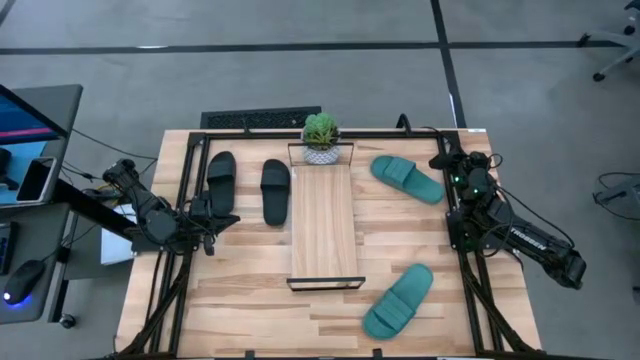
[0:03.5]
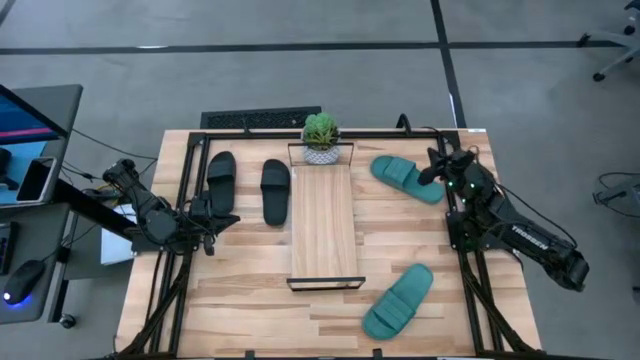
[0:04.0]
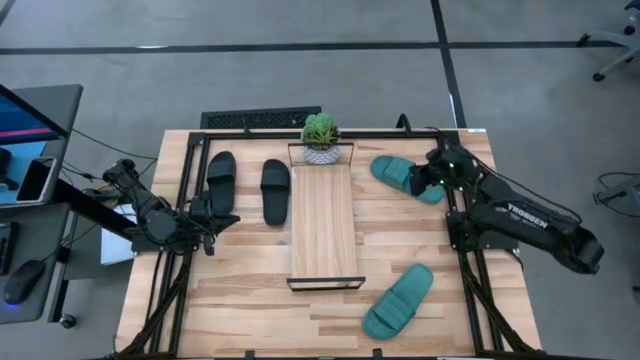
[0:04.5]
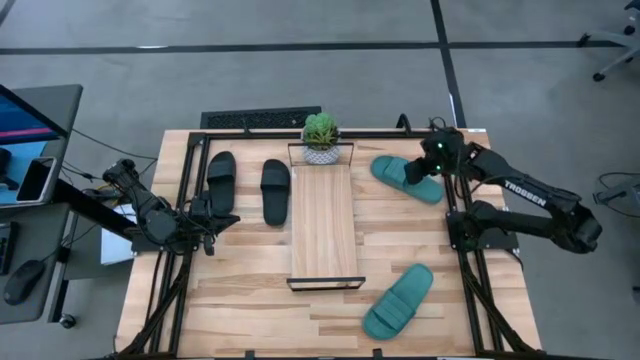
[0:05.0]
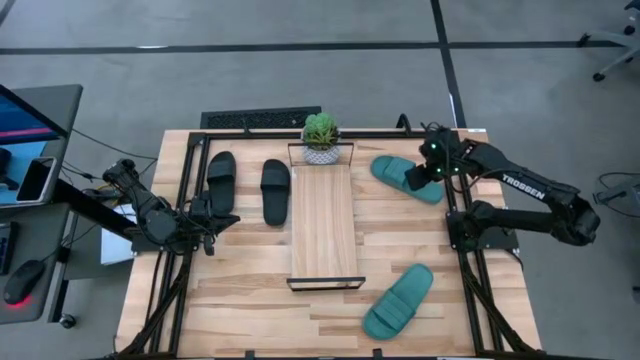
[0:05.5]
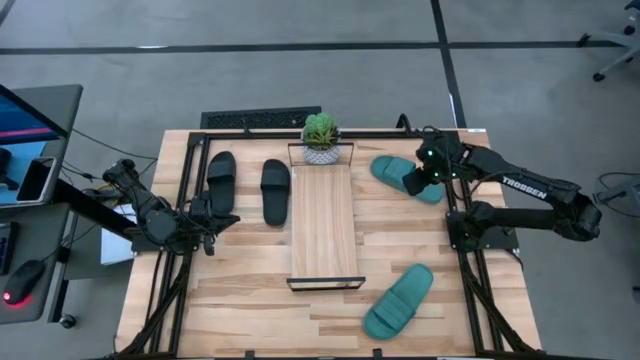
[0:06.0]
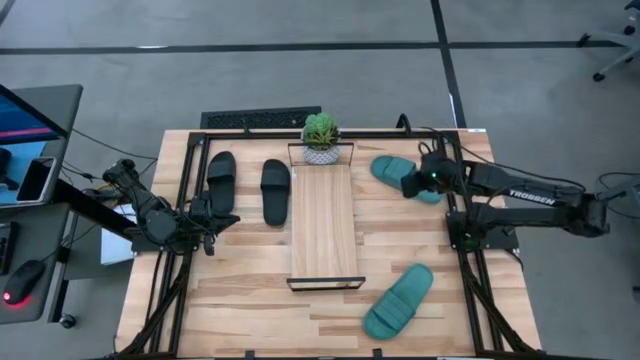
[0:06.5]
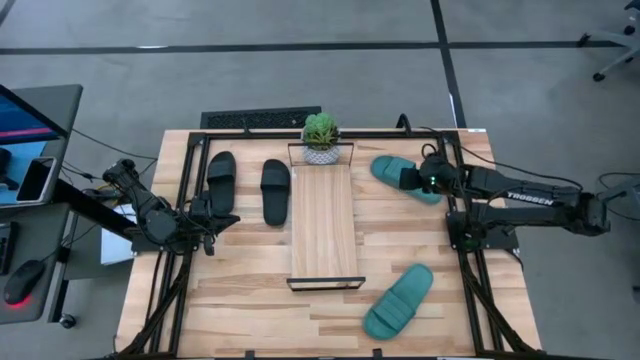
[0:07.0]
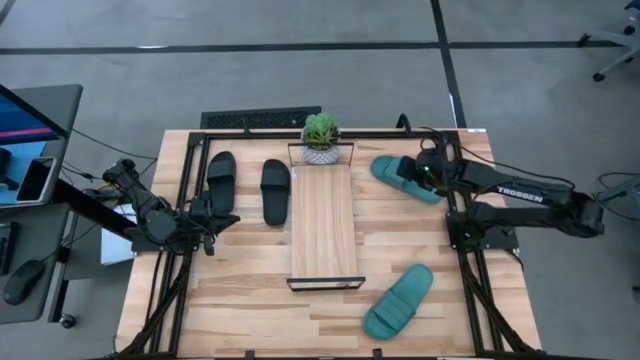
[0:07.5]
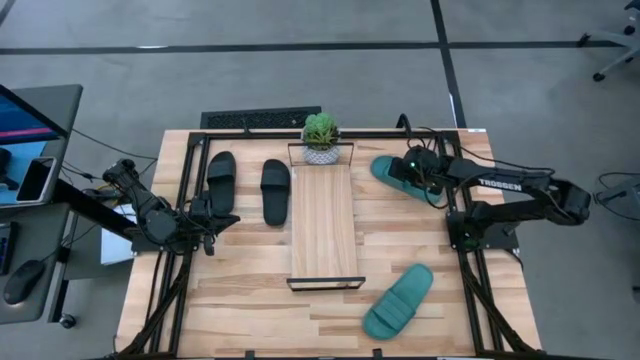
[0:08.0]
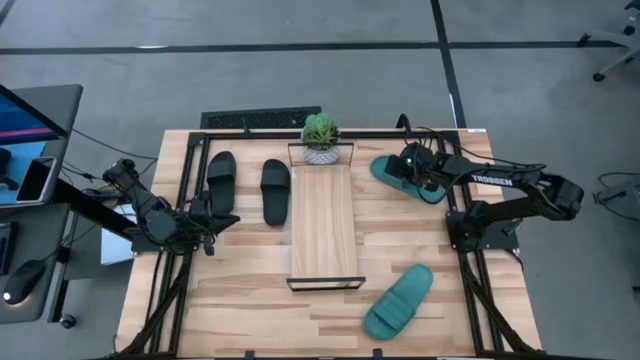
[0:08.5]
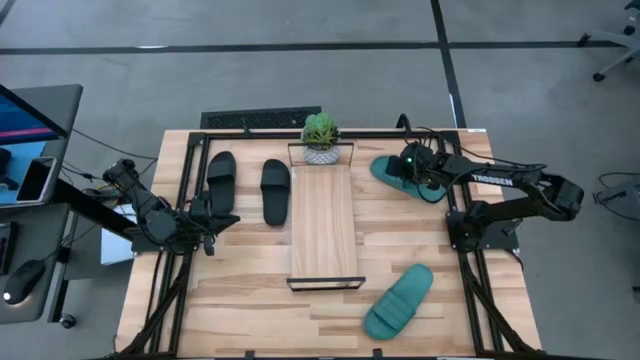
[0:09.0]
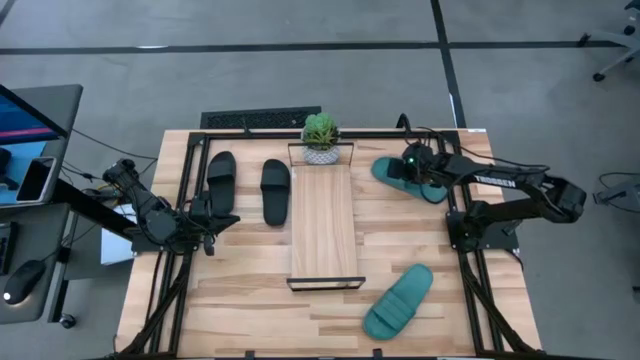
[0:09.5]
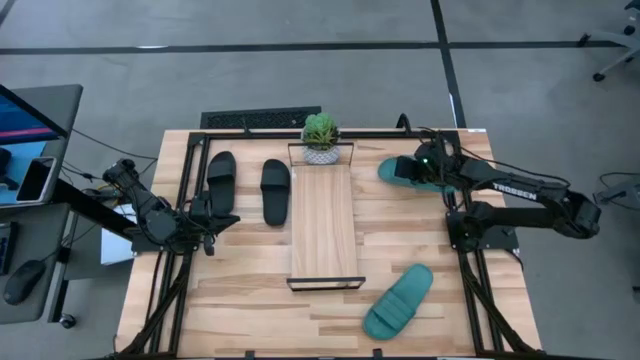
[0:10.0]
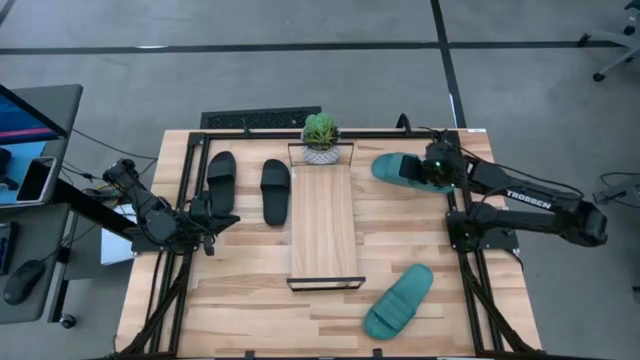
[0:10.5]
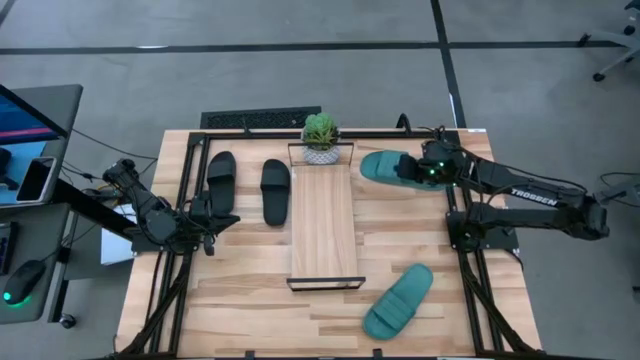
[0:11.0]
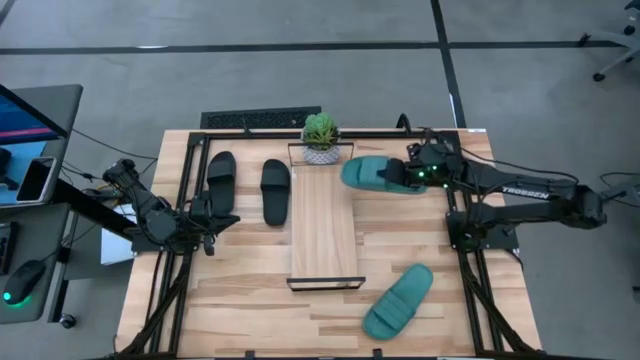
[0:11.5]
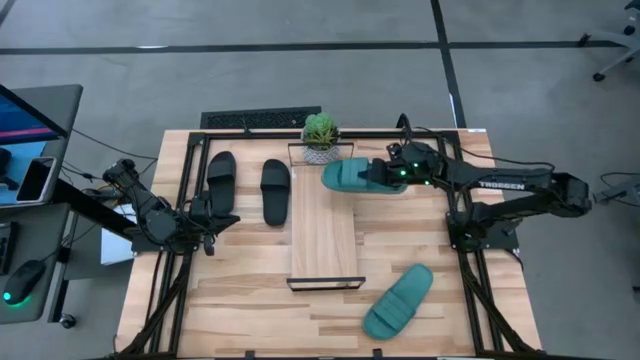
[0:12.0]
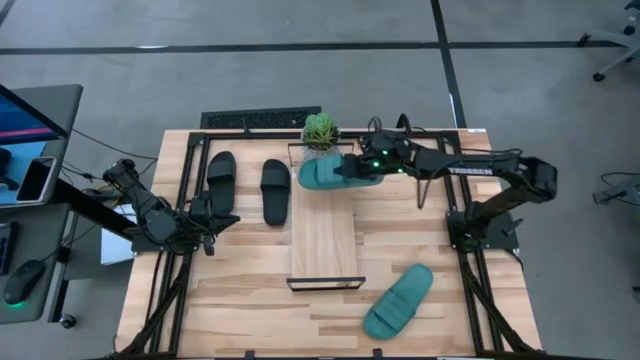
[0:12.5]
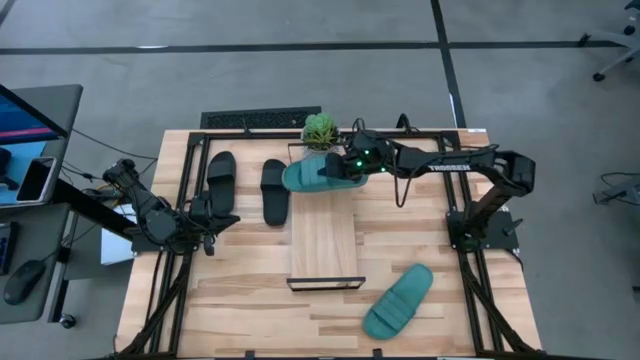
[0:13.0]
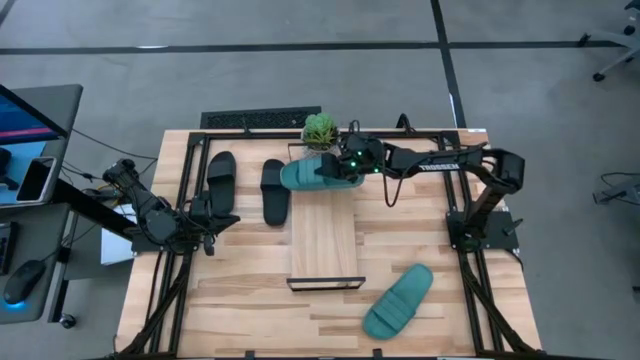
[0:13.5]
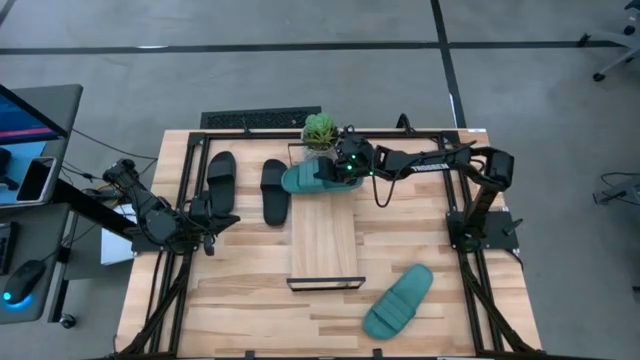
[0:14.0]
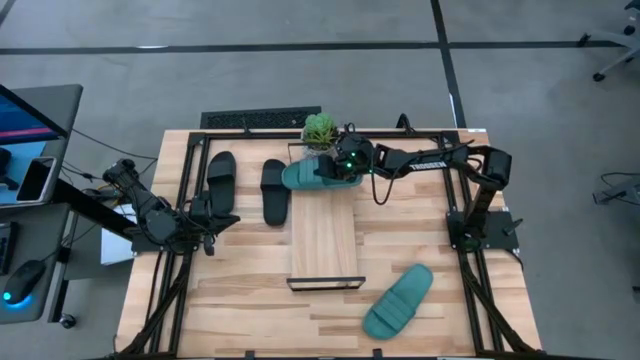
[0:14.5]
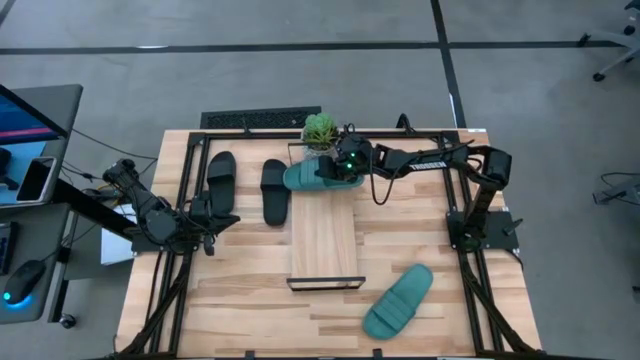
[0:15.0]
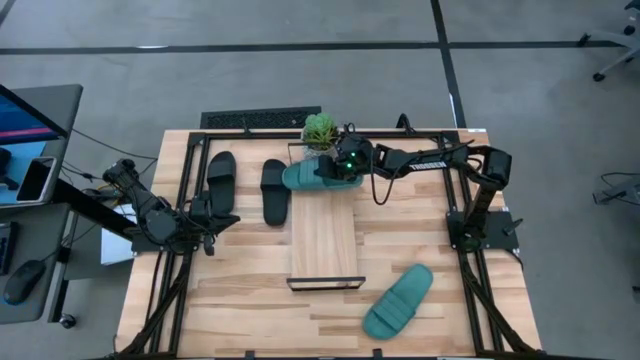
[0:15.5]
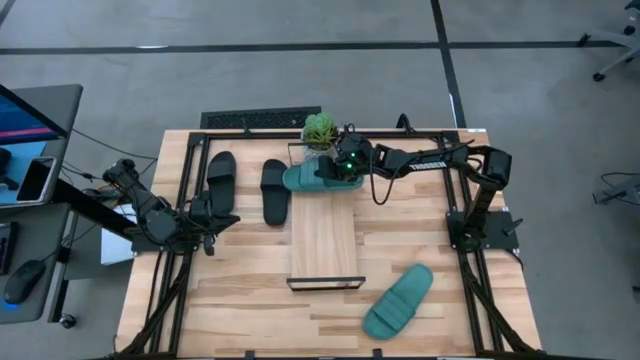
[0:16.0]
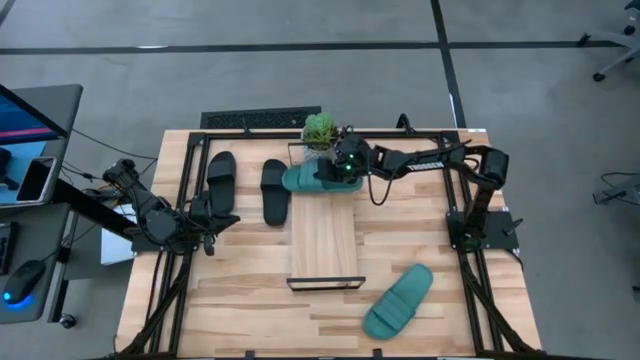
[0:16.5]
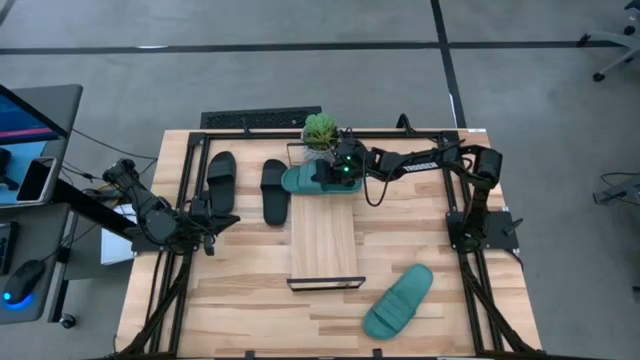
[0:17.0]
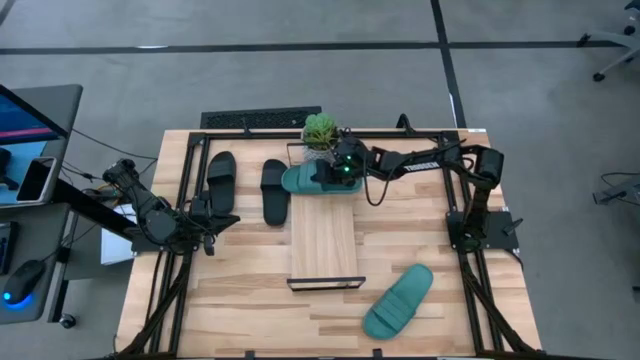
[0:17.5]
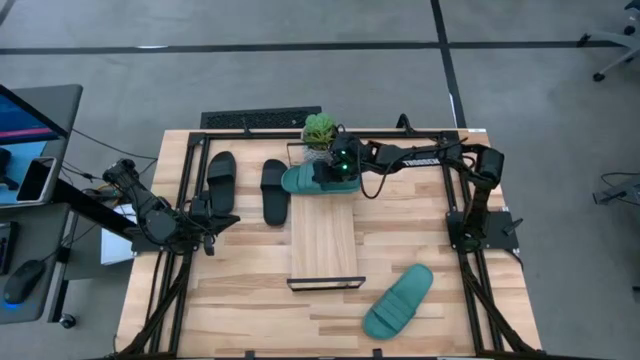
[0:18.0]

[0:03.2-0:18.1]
Task: Pick and place slides into the shelf
Put the top green slide on the shelf

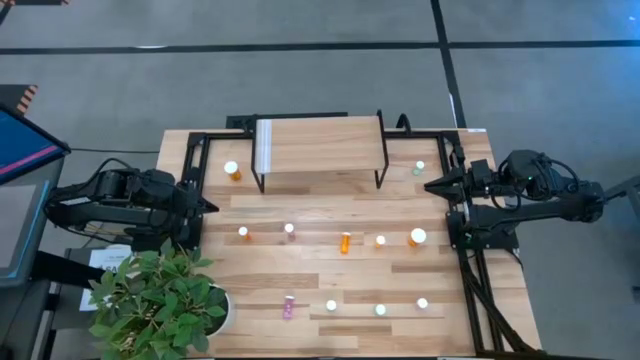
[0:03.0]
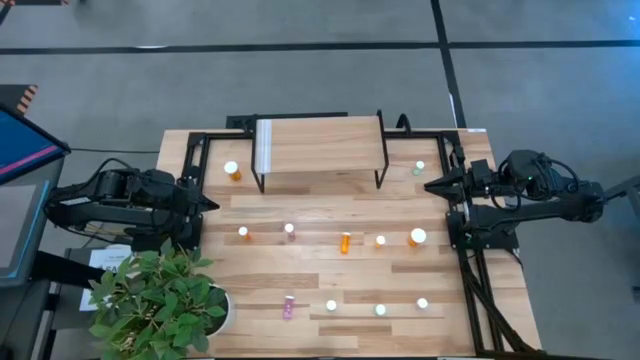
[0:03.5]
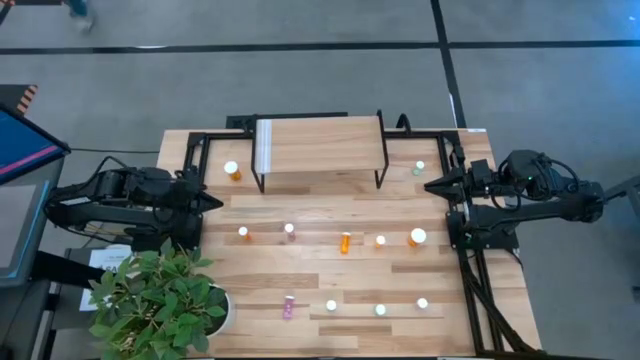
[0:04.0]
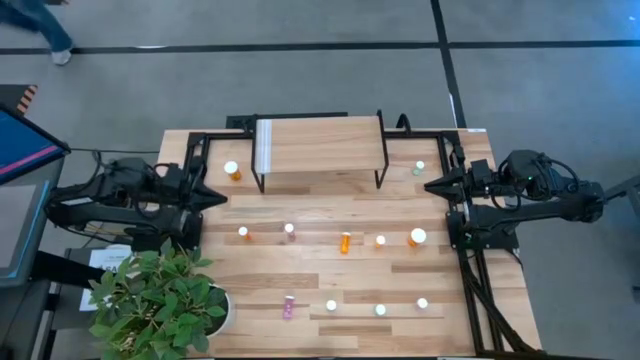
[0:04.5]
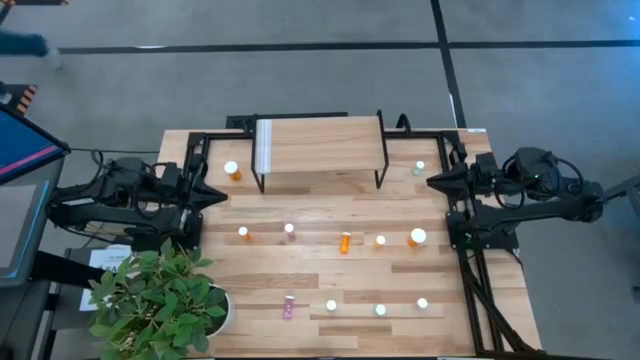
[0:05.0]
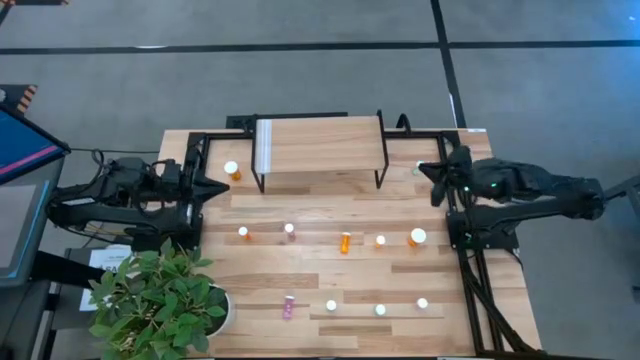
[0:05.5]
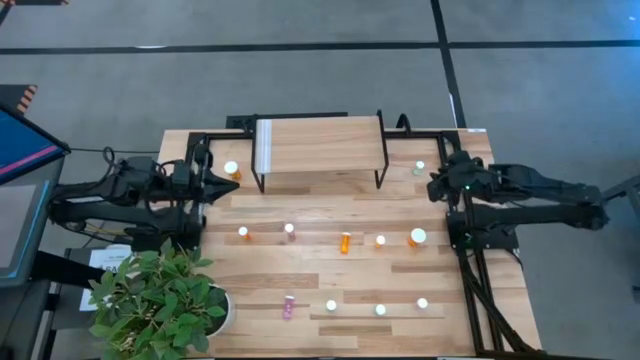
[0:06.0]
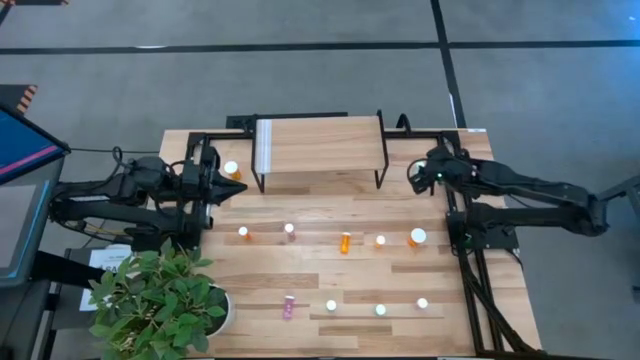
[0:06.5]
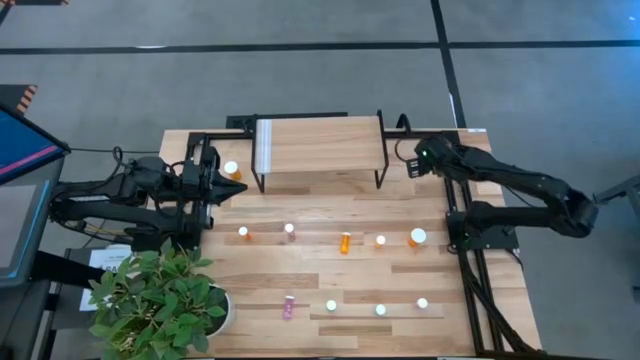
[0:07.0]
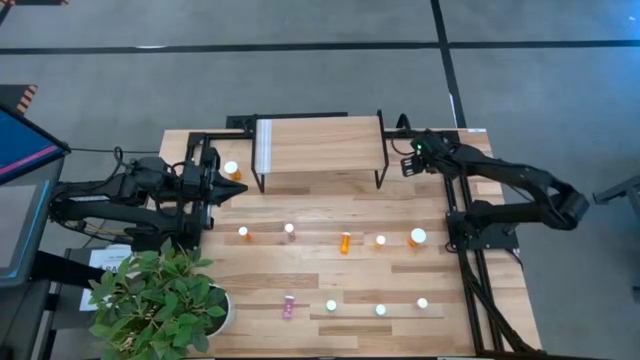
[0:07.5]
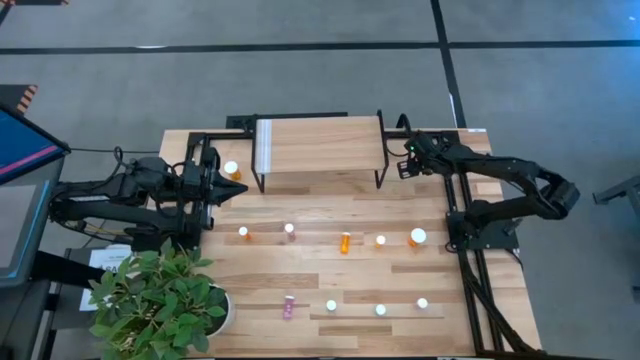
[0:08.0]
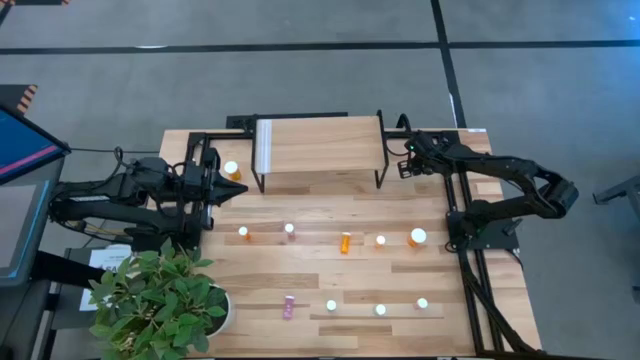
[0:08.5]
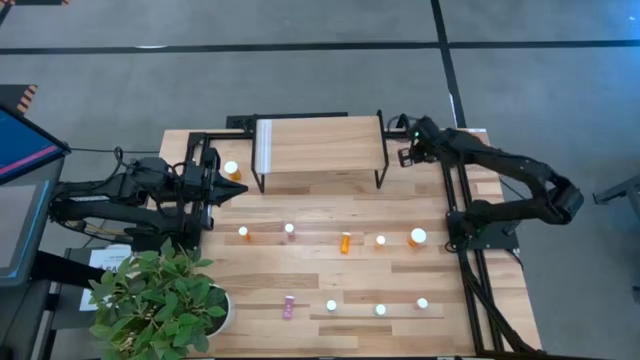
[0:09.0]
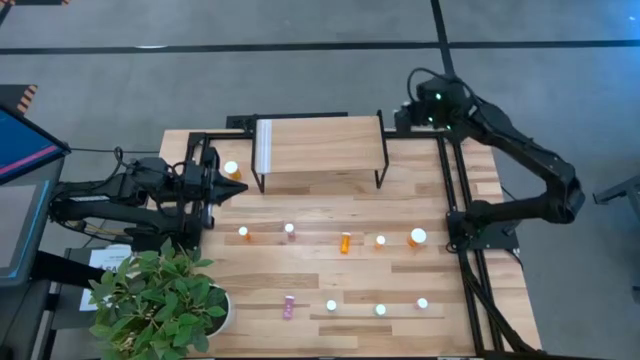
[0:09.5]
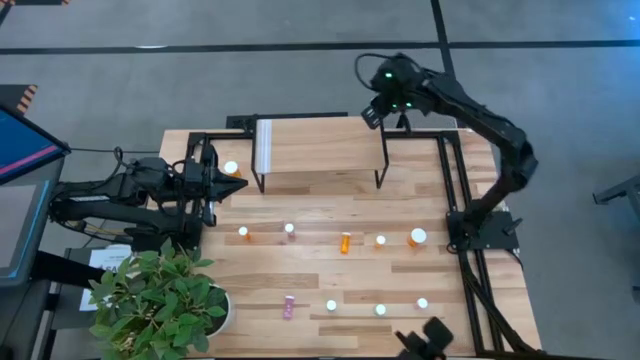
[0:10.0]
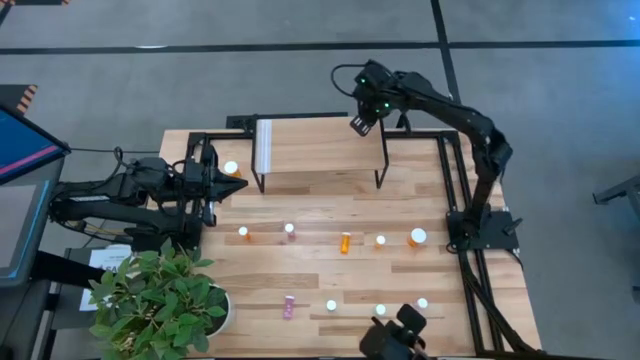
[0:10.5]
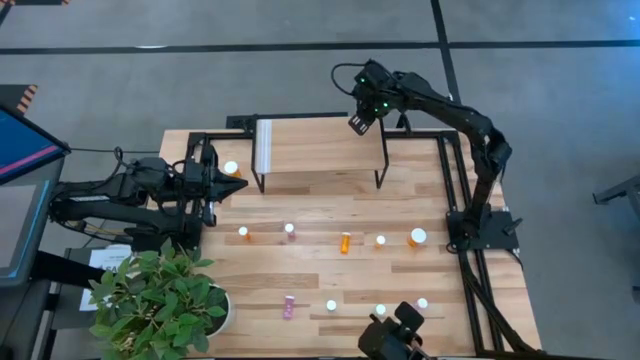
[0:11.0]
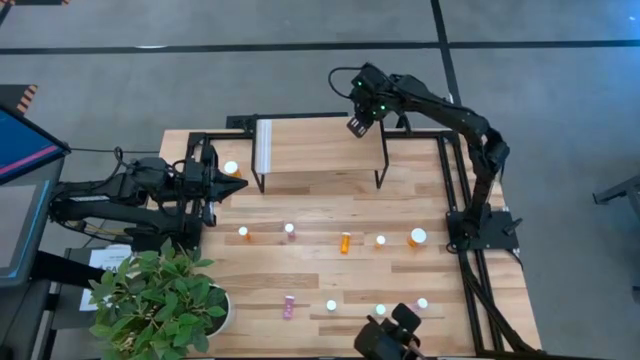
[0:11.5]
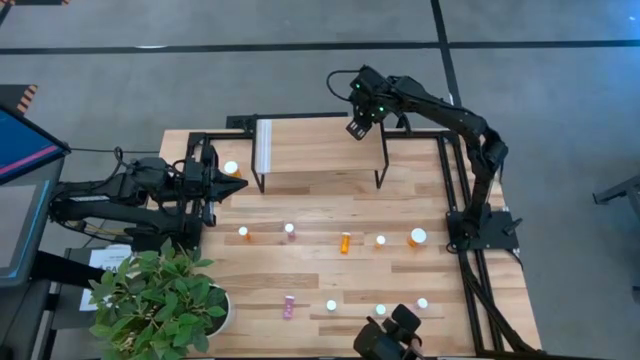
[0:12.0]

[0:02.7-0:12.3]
Task: Pick and place medicine bottles onto shelf by color
Put the top small green pill bottle on the shelf
